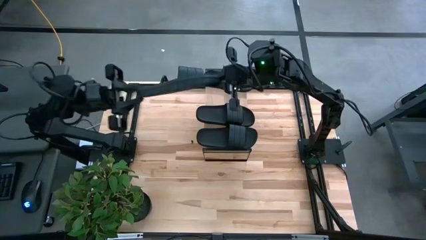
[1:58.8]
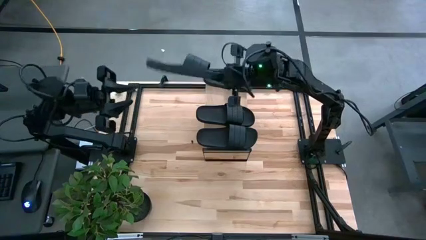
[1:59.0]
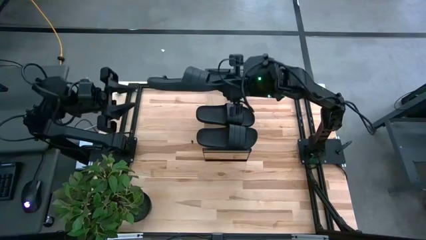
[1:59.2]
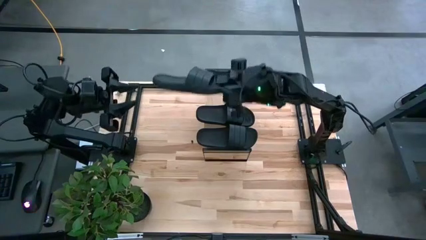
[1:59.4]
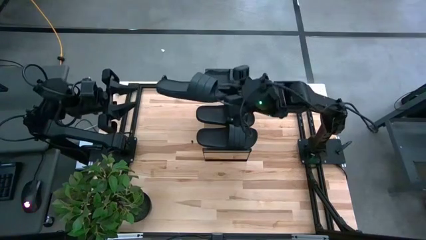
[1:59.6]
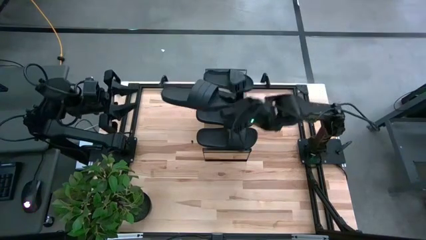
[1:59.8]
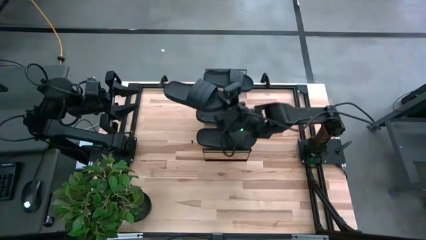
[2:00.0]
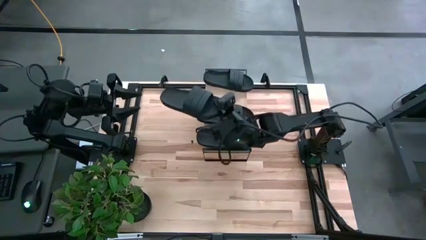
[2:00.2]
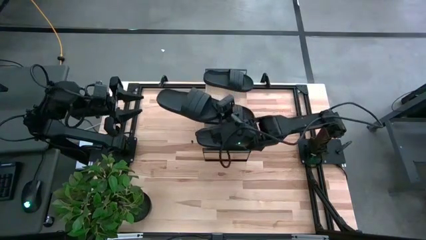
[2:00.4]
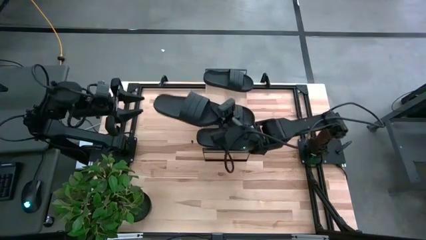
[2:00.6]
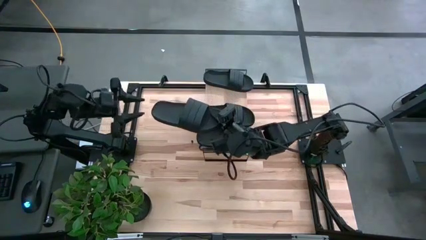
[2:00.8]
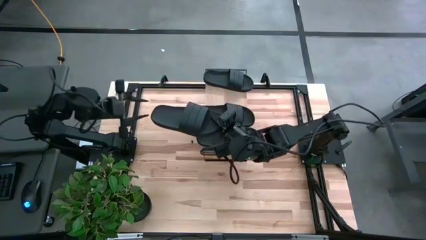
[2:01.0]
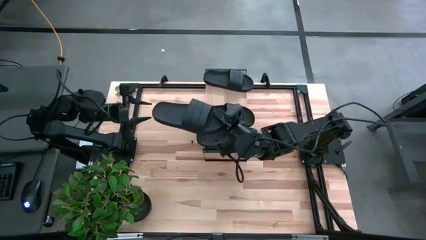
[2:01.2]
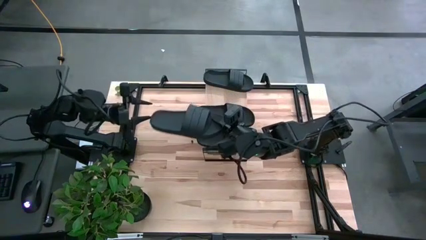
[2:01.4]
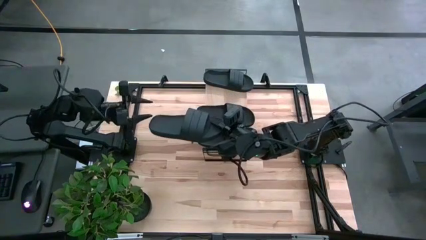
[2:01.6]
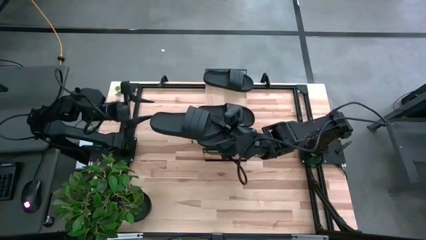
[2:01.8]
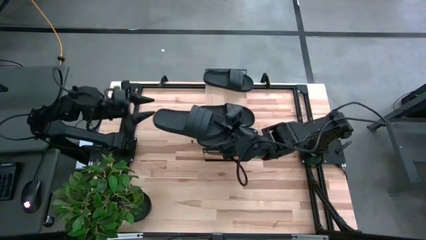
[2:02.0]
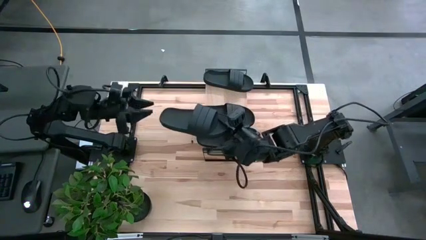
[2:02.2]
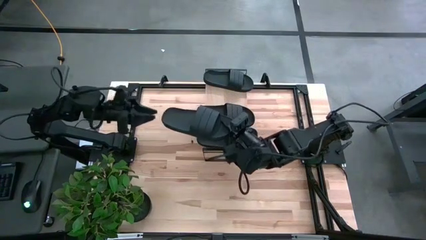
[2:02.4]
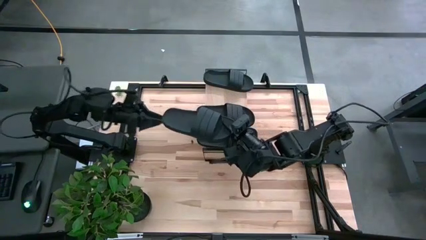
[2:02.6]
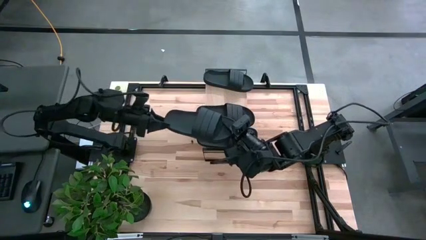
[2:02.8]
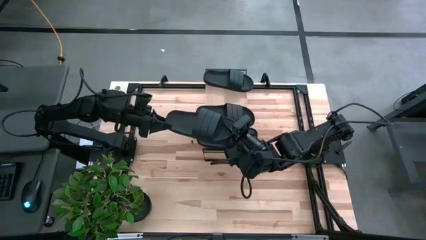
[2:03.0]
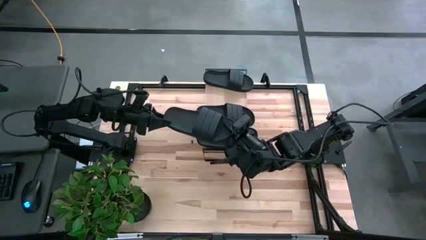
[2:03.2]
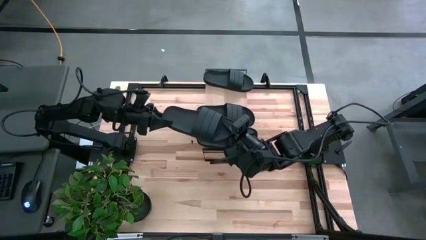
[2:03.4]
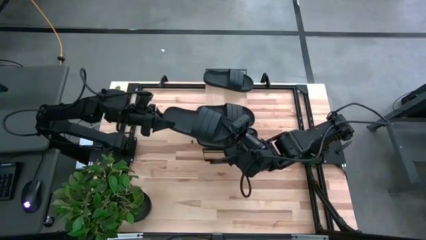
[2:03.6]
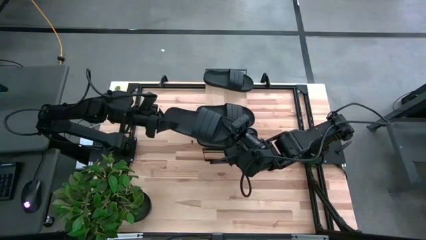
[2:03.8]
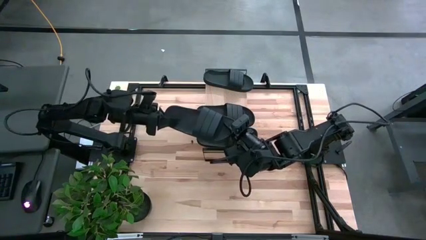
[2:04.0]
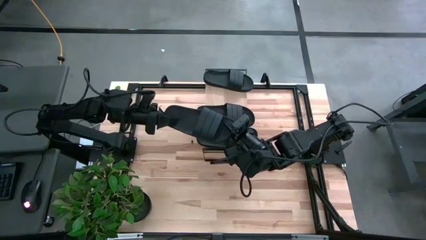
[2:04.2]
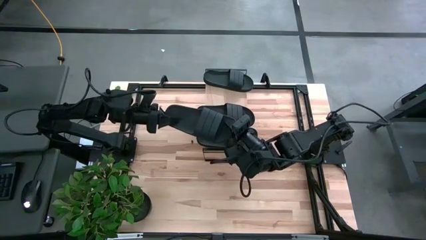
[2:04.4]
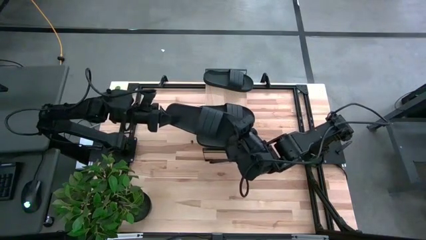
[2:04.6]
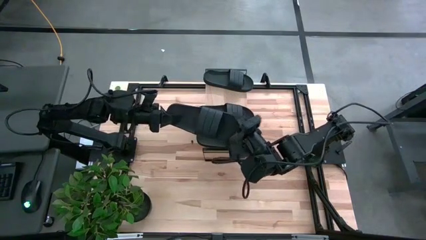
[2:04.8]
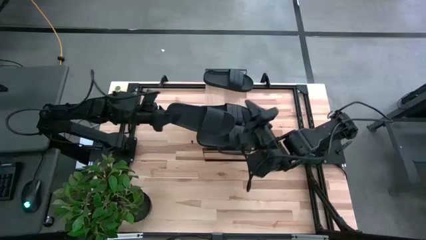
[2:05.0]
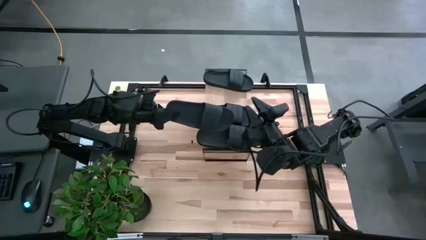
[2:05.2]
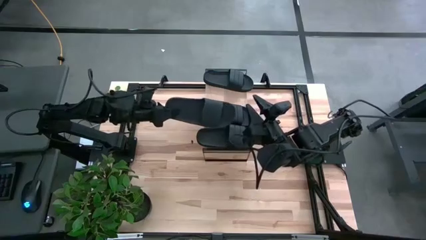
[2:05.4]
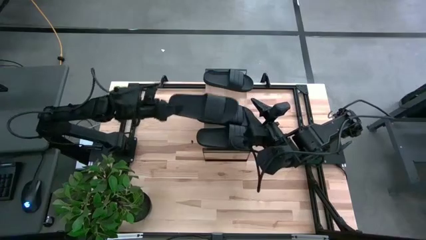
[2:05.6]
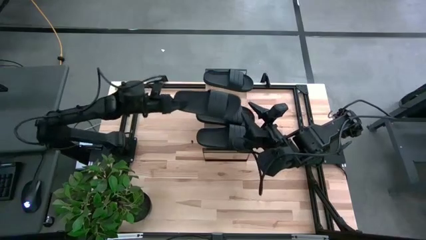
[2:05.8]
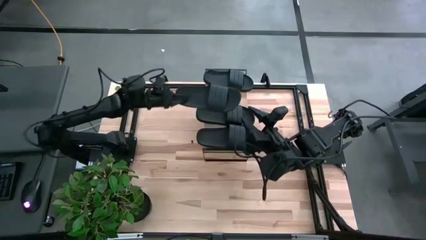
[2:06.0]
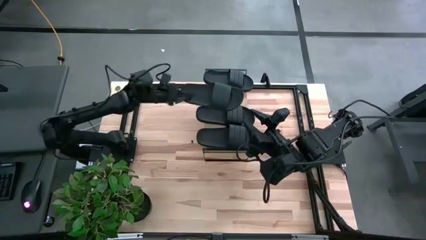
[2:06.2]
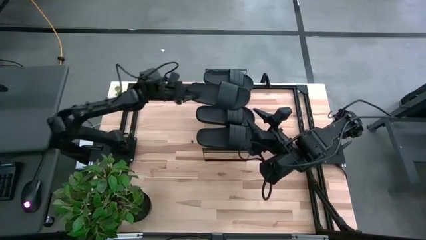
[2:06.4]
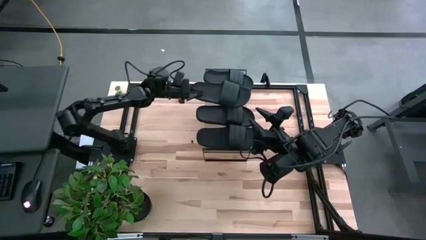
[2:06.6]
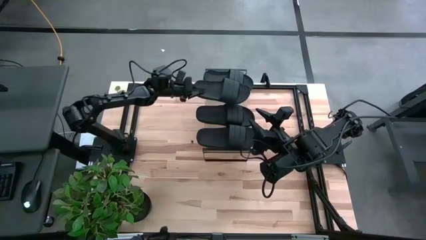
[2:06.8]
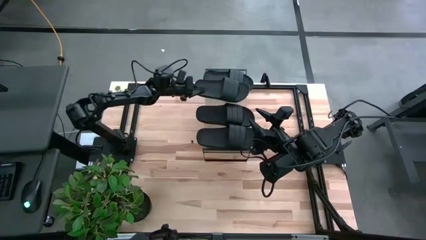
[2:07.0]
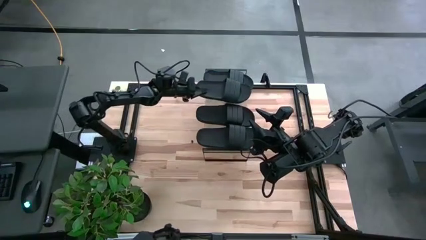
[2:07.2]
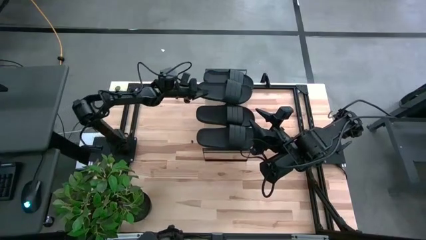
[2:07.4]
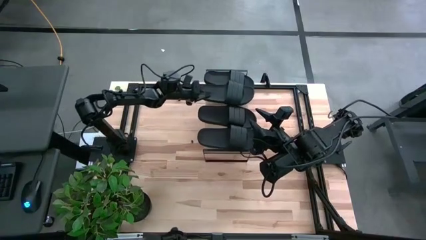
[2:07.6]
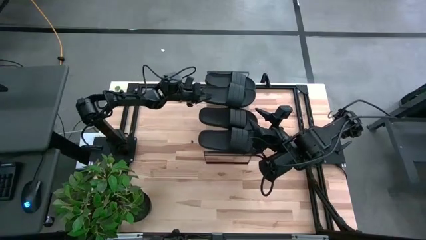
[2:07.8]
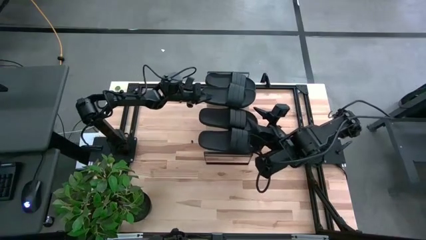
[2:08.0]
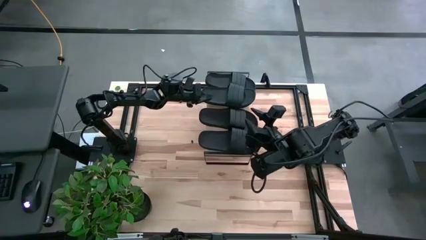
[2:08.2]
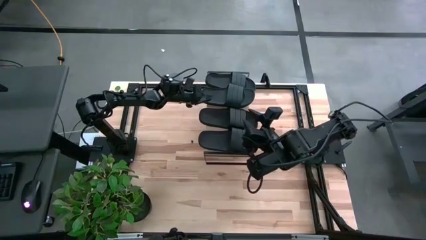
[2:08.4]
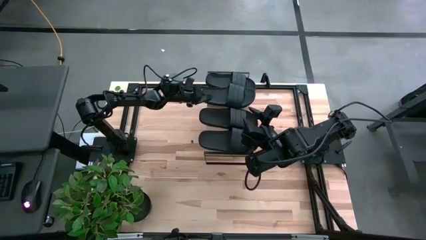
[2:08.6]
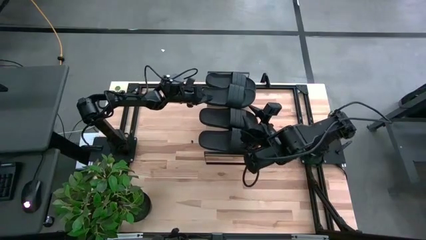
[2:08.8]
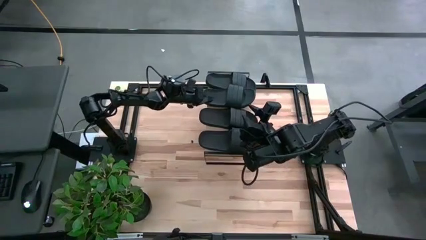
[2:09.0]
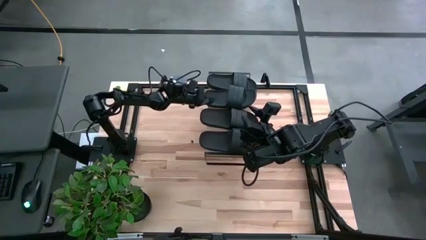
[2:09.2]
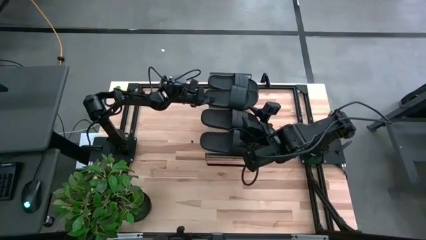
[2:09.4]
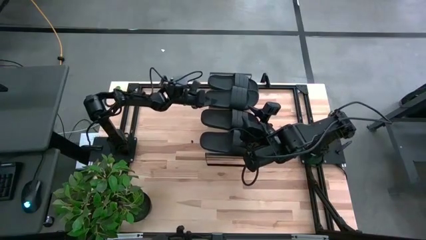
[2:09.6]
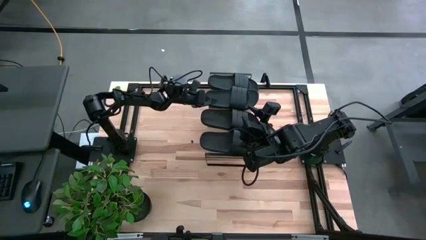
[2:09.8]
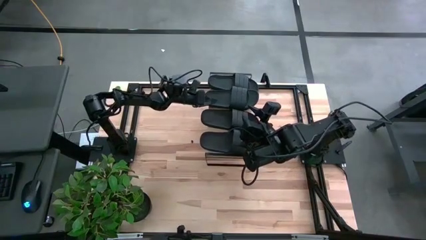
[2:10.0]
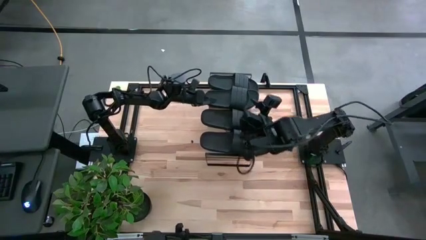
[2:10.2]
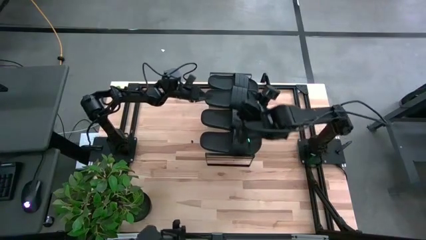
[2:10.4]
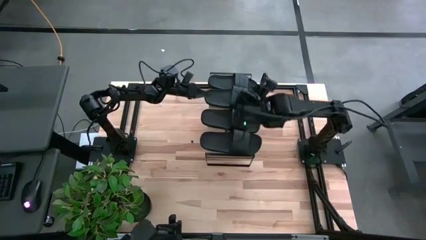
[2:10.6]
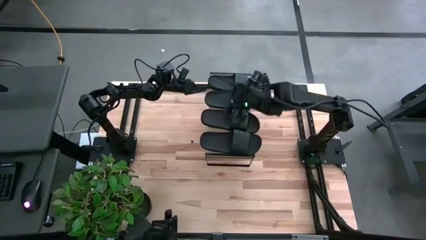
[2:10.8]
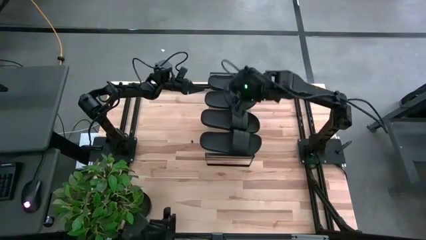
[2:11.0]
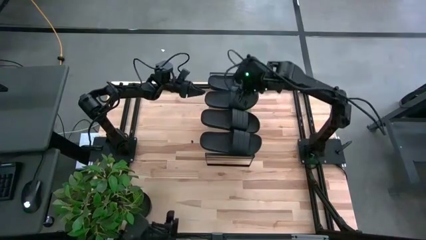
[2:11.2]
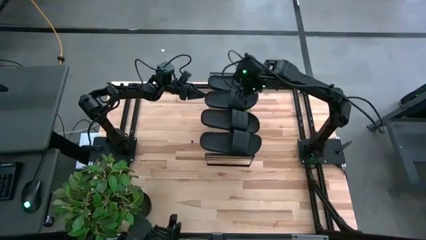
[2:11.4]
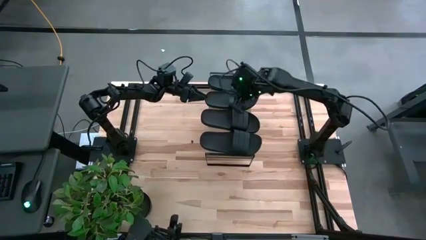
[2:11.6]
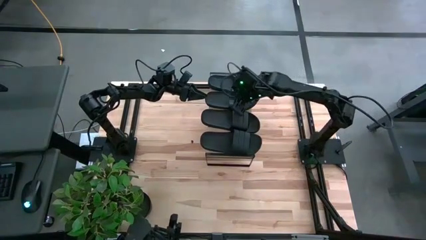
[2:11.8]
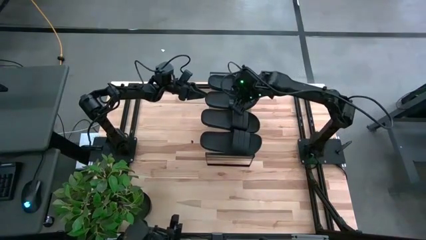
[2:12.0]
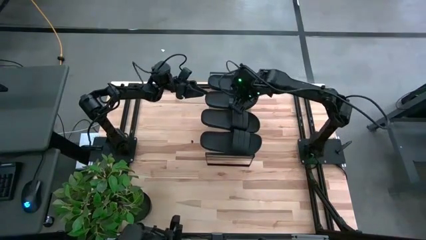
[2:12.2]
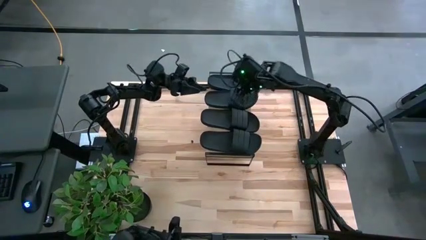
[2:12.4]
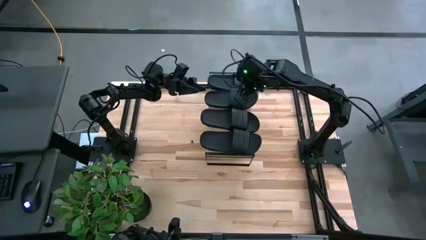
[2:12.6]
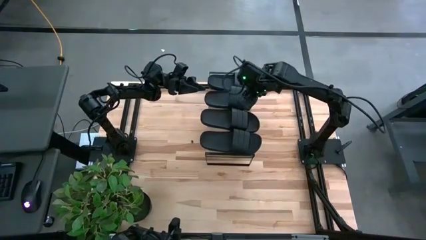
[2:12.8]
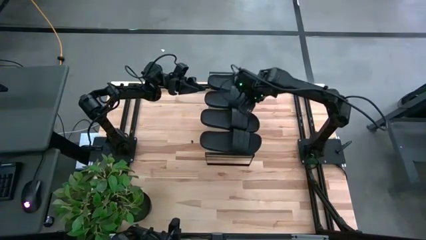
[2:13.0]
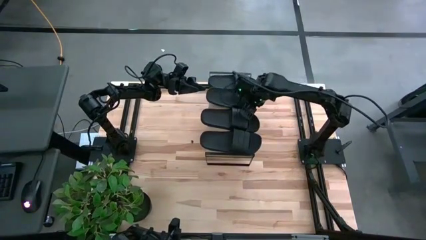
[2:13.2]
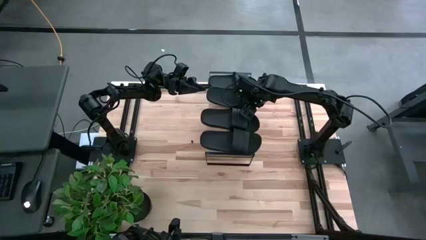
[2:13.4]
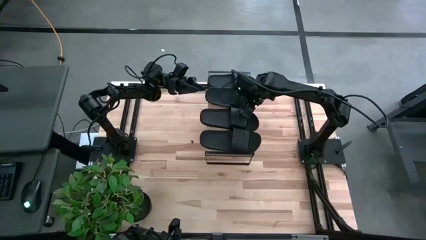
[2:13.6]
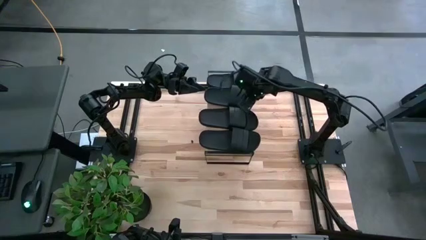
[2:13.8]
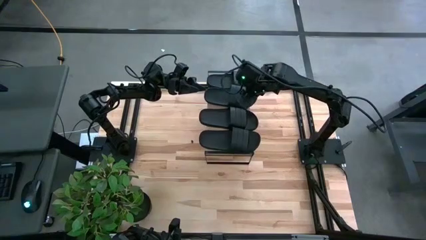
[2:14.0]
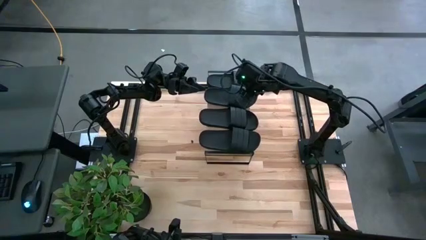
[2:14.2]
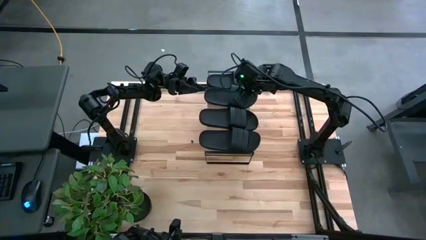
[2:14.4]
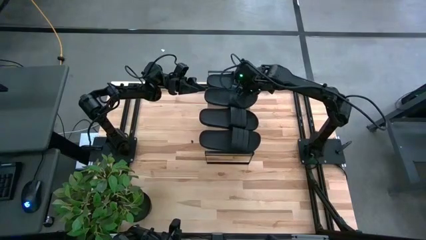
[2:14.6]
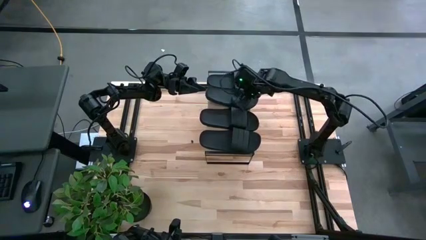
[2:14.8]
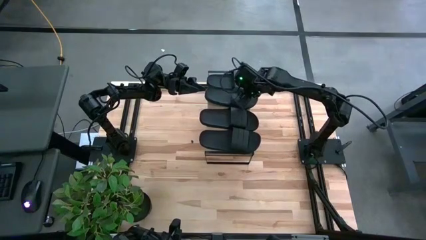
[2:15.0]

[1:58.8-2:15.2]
Task: Pick and place slides into the shelf
Put the black slipper on the shelf
